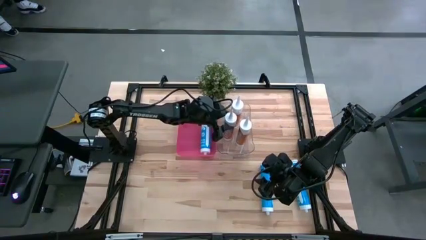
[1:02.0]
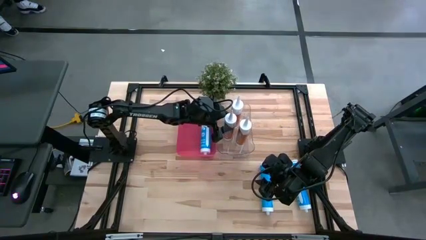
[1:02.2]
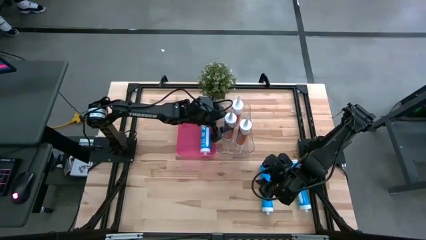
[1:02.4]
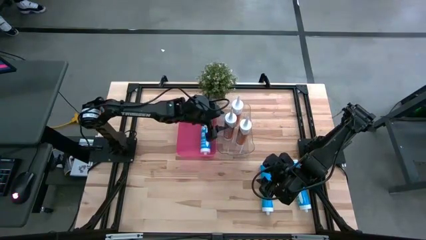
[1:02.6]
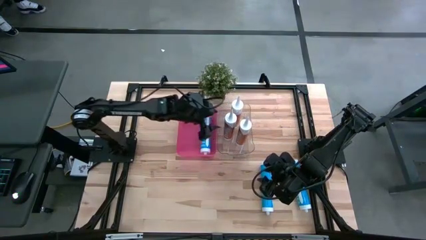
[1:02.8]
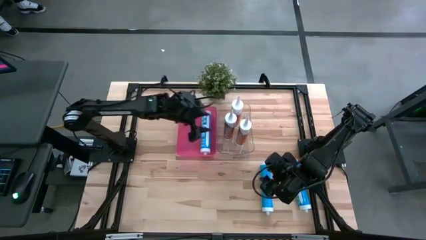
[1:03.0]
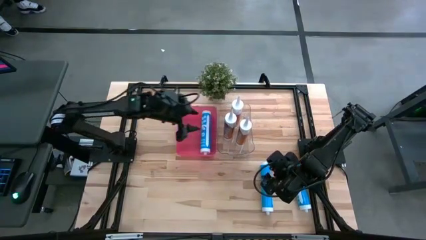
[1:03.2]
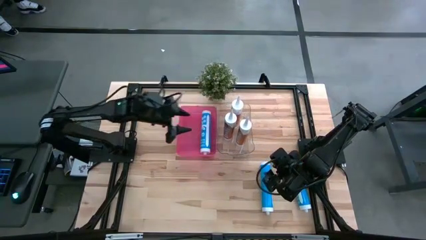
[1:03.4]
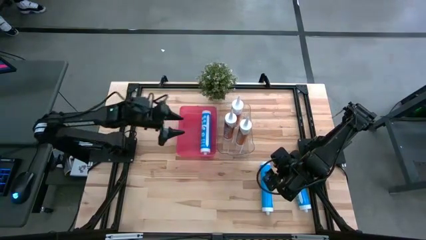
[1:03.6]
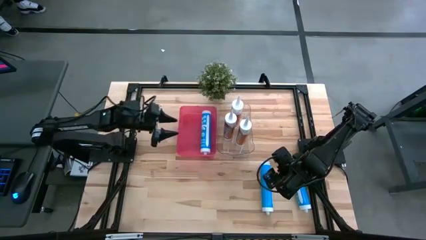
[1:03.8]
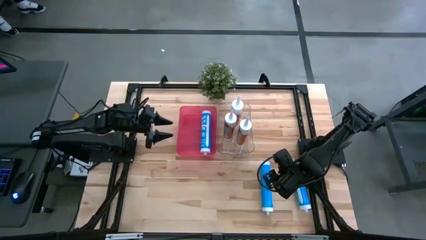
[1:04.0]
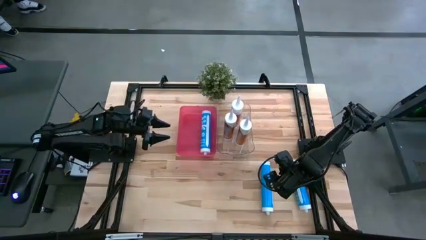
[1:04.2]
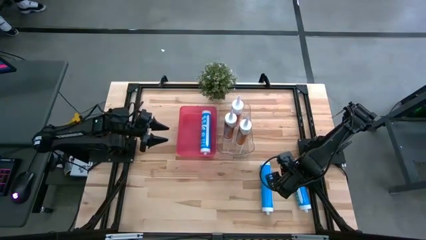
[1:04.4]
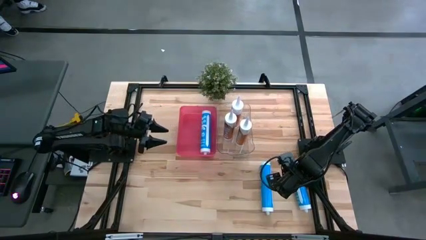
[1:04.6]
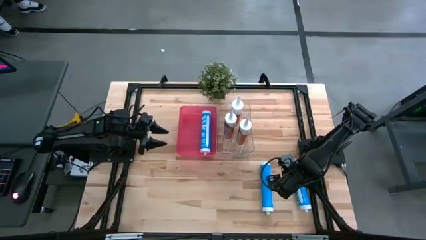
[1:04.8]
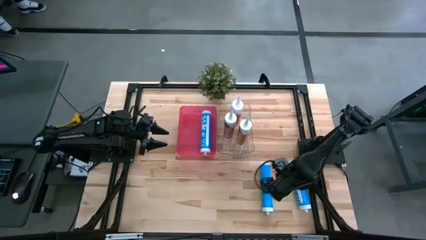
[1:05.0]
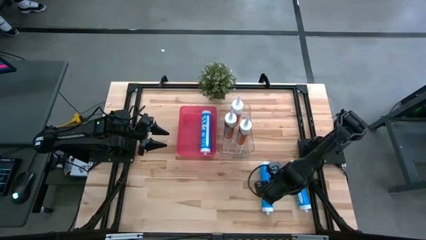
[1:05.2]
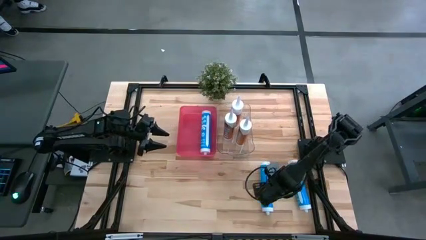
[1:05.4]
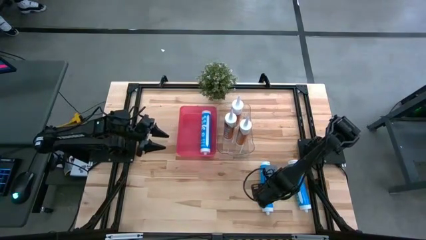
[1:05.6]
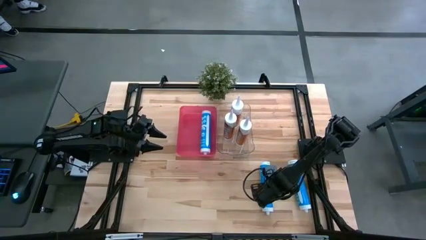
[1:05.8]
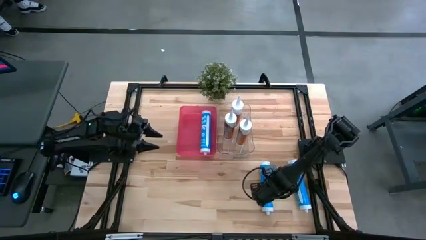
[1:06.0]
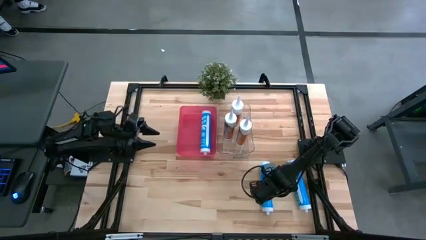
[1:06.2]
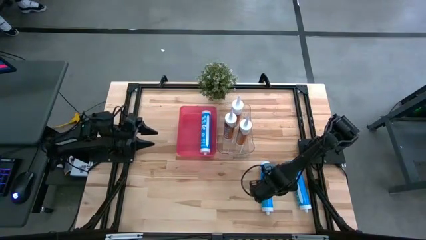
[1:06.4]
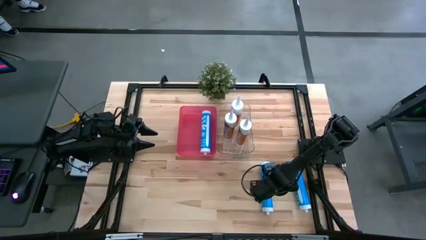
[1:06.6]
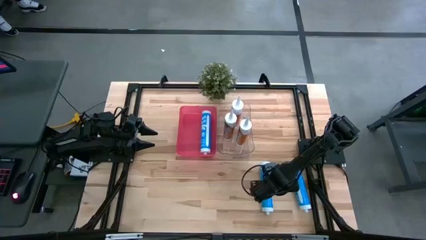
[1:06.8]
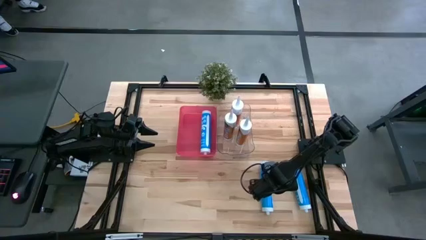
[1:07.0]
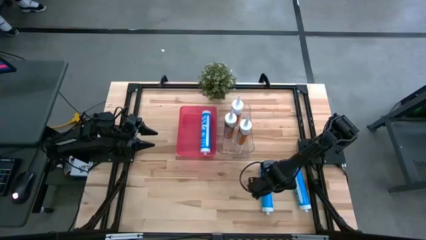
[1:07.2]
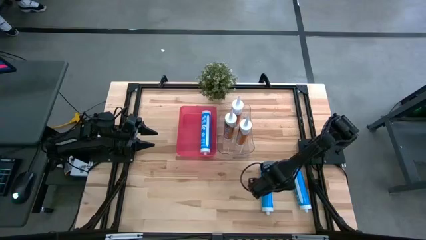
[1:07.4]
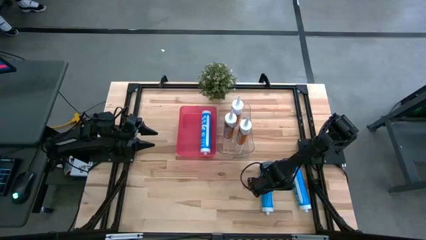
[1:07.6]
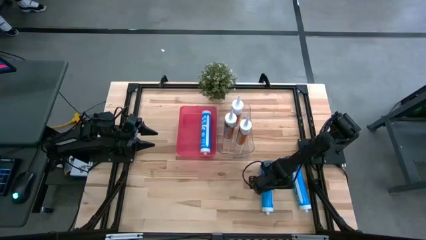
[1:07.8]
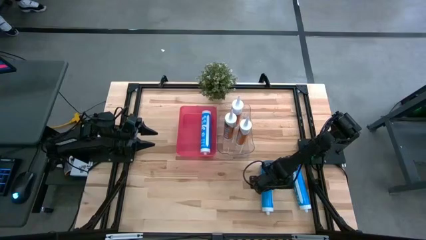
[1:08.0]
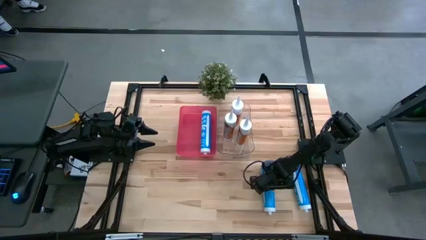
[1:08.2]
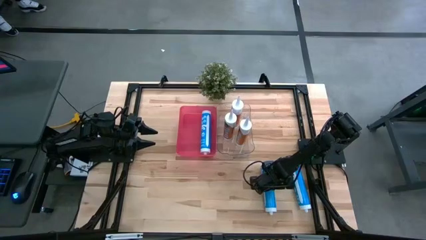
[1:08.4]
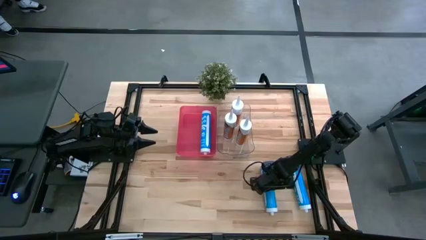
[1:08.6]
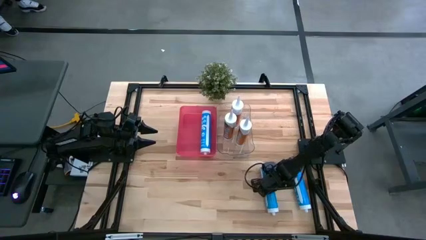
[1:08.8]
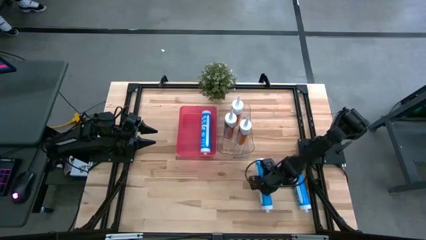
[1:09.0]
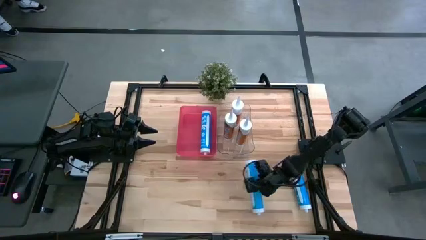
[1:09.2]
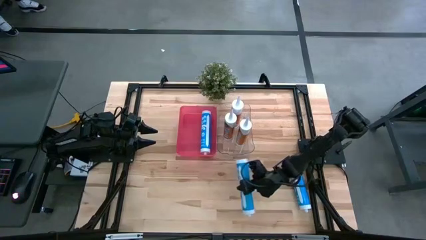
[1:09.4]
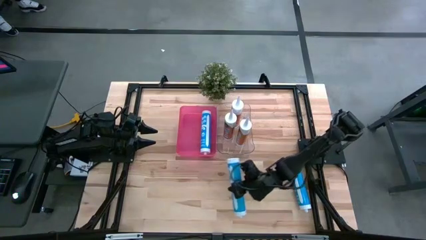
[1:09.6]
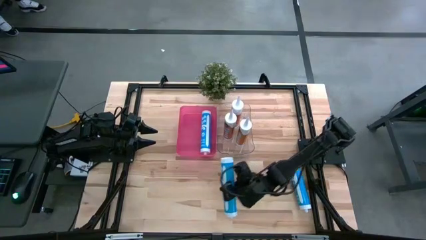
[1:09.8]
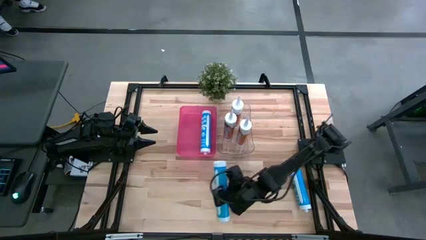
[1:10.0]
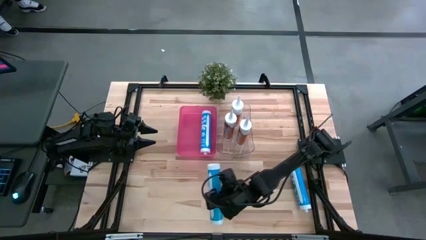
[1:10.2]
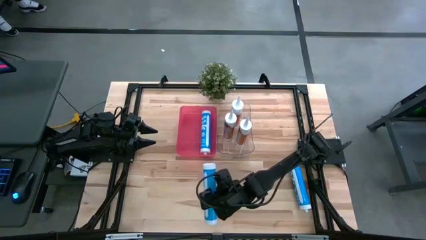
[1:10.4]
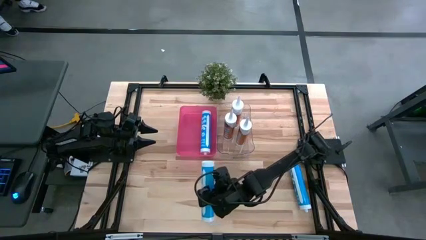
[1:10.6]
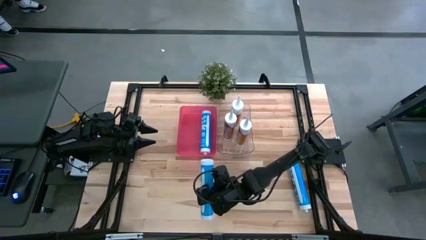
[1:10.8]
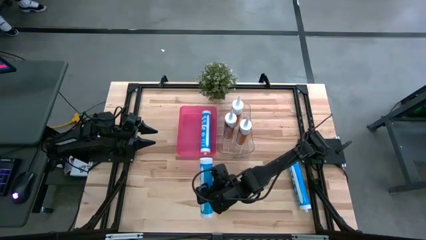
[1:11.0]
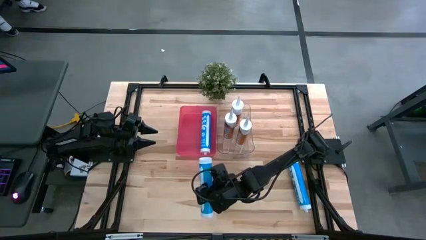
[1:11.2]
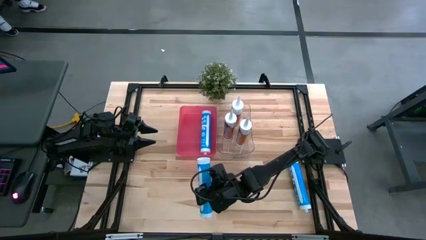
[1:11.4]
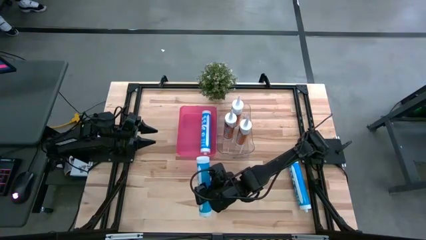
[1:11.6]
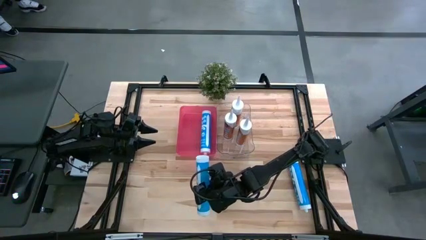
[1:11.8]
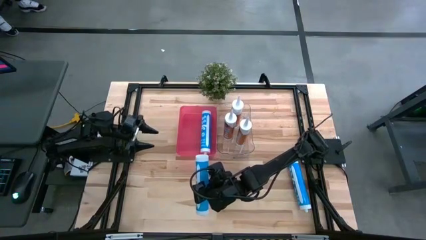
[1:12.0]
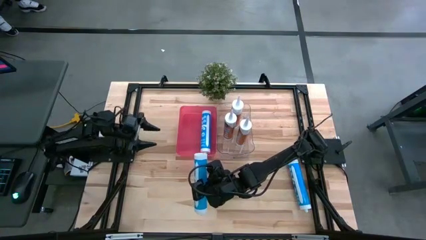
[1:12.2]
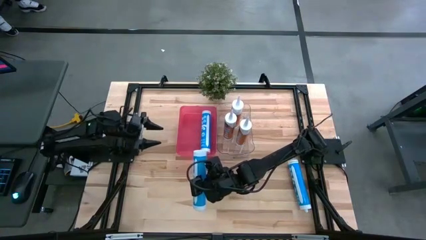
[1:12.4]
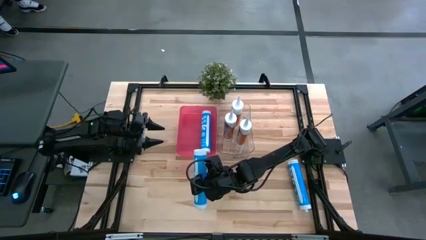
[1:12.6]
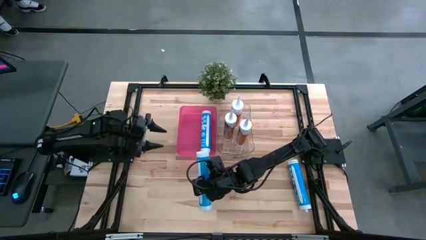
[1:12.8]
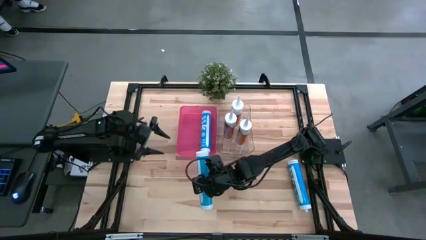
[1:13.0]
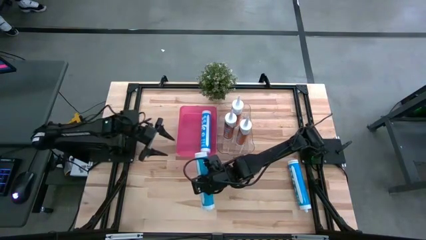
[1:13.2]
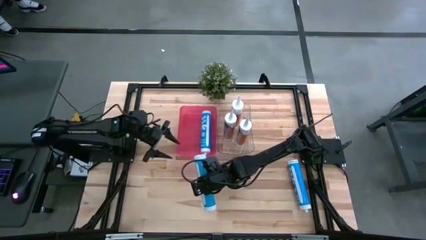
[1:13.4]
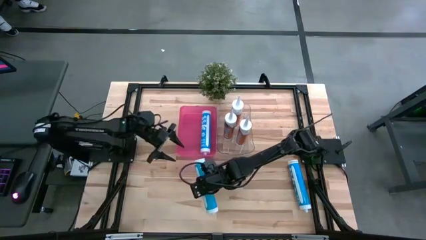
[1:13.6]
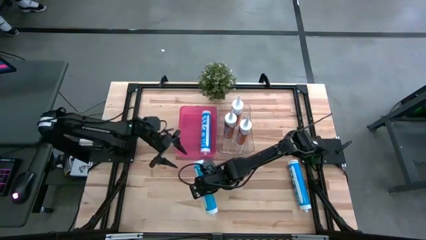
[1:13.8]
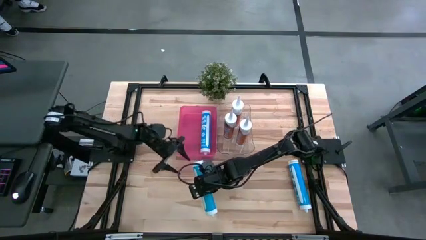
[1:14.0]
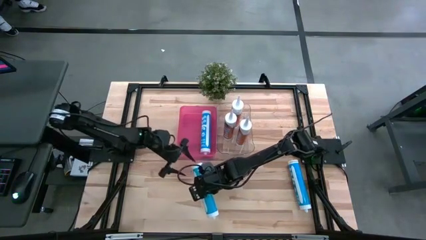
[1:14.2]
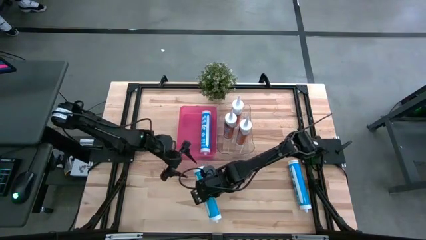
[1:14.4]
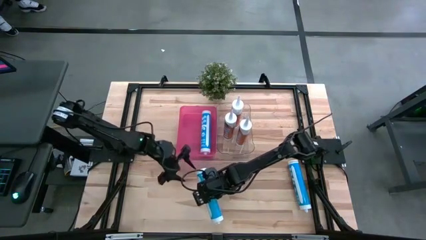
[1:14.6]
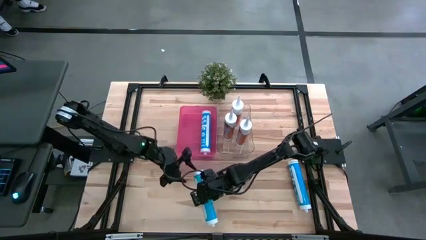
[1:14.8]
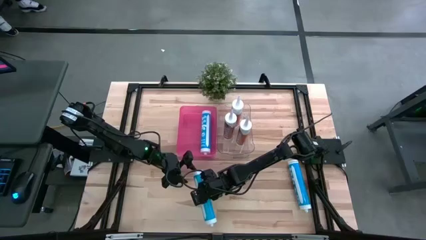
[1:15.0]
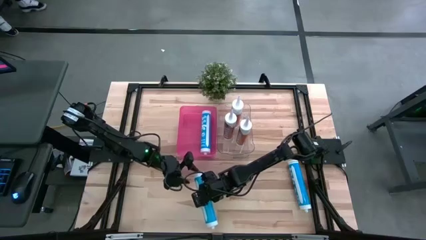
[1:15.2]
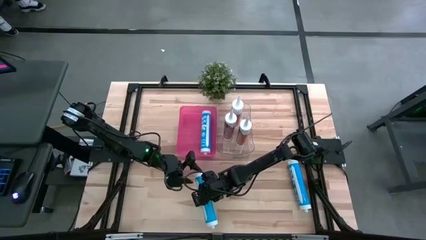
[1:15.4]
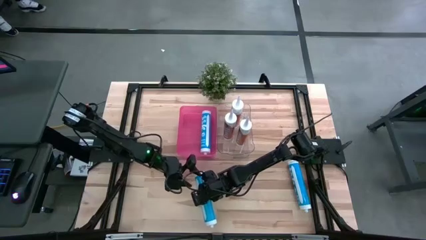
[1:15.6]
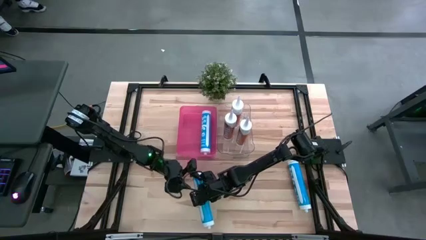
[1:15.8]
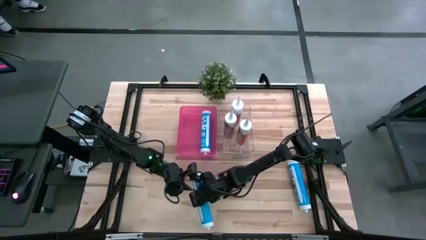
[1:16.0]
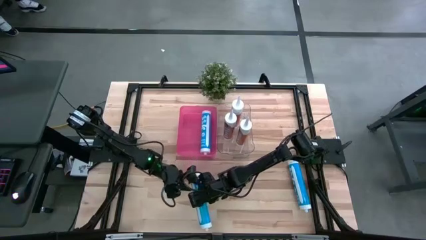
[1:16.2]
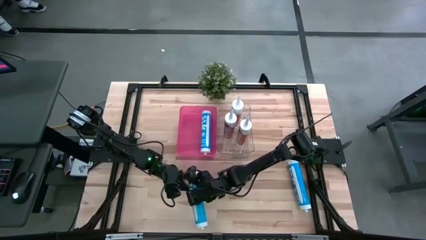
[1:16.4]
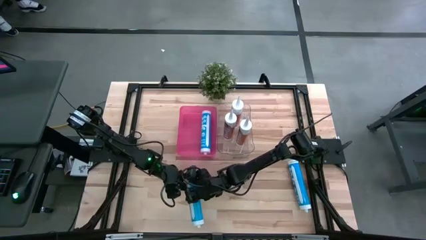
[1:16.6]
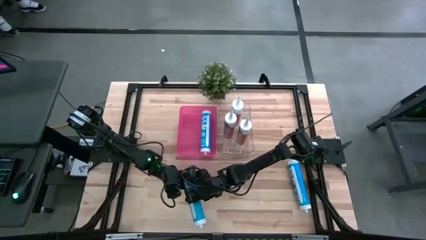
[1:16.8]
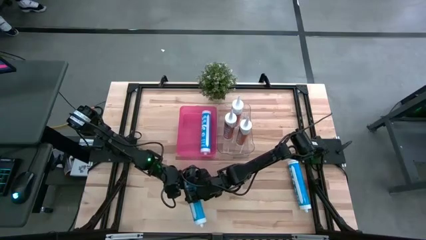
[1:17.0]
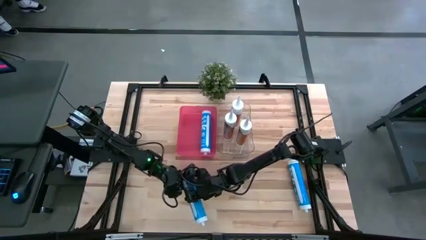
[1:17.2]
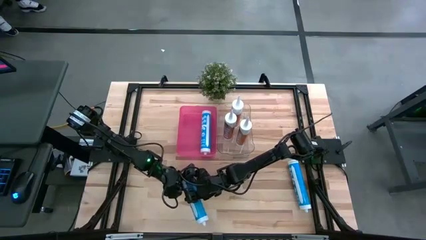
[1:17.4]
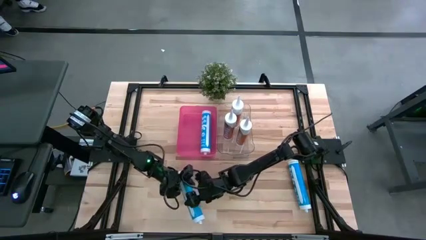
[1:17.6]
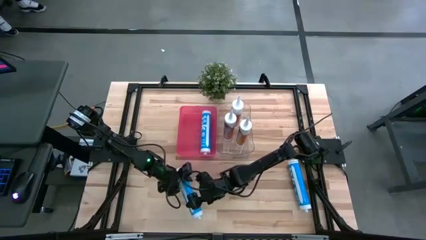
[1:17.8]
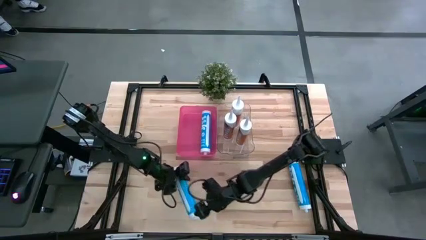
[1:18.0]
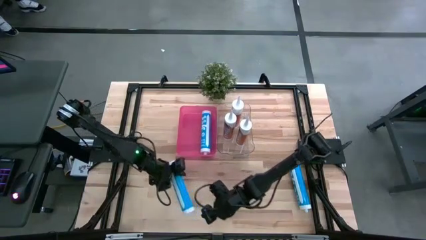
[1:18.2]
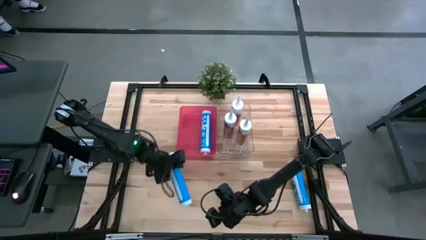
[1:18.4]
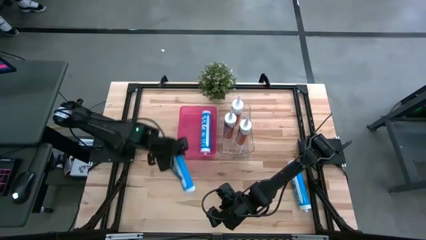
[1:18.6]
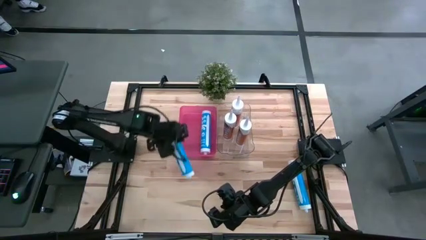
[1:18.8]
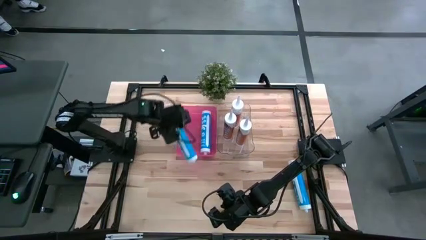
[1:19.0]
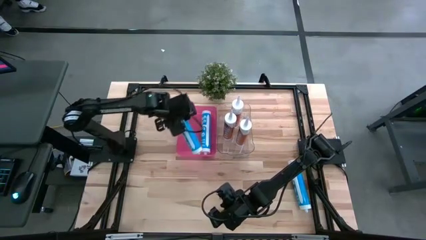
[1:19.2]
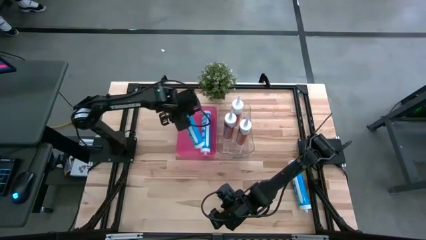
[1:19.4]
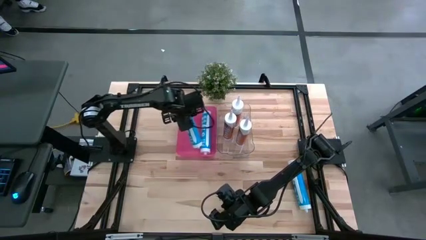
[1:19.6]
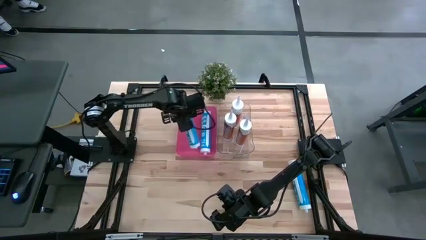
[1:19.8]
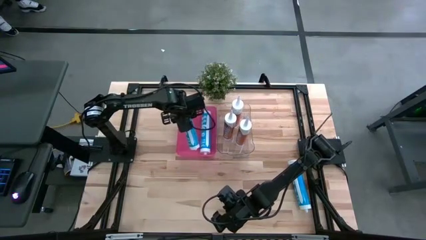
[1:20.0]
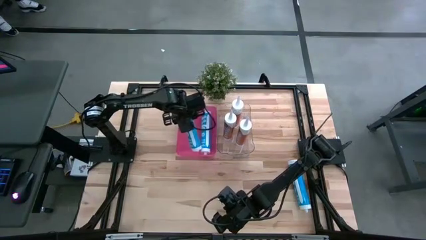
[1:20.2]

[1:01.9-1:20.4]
Task: Pick & place silicon tubes, Sealant and Lysol wipes
Put the left blue sealant into the pink bin
